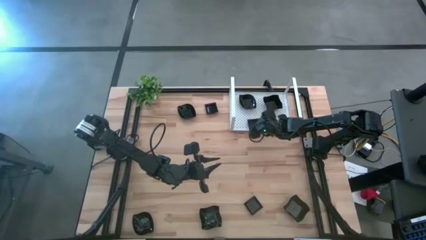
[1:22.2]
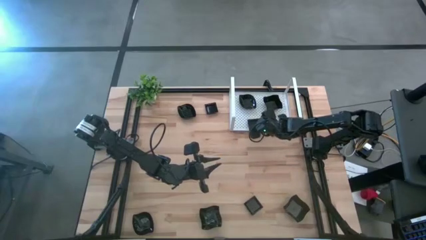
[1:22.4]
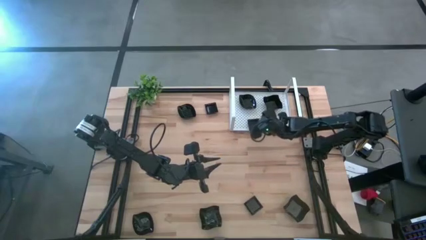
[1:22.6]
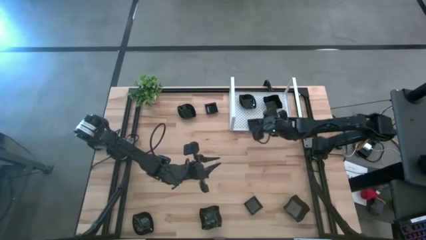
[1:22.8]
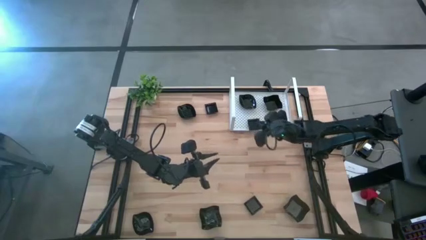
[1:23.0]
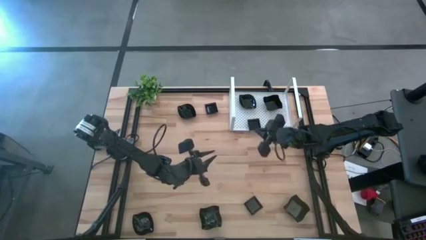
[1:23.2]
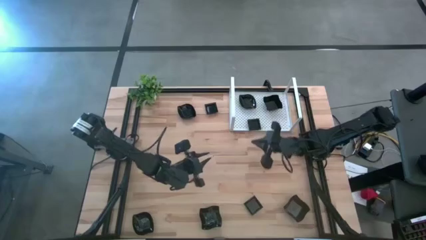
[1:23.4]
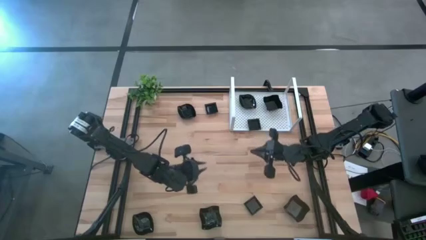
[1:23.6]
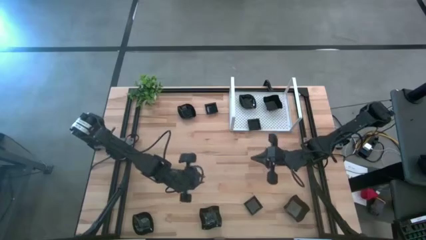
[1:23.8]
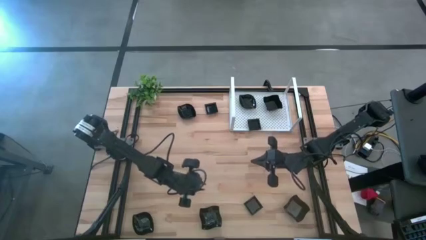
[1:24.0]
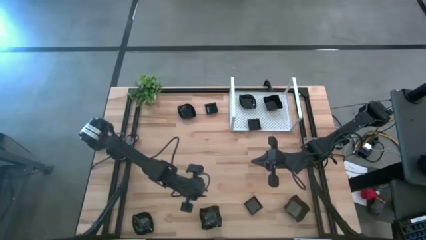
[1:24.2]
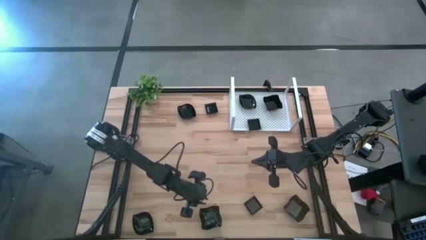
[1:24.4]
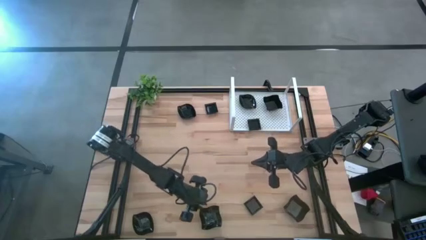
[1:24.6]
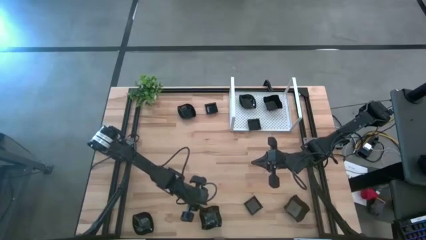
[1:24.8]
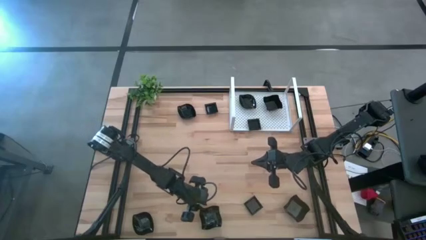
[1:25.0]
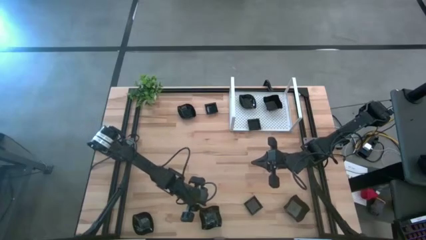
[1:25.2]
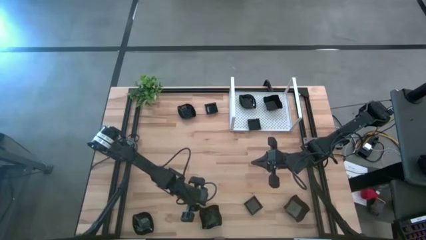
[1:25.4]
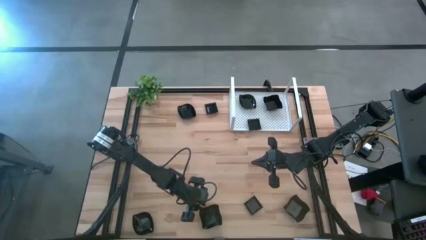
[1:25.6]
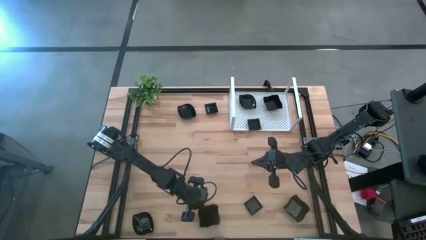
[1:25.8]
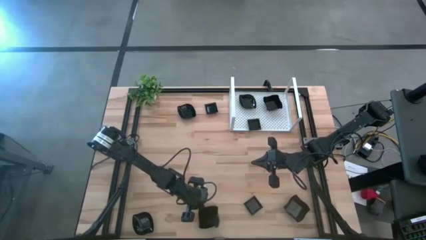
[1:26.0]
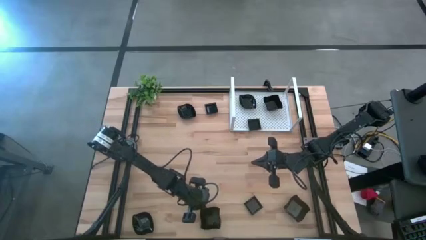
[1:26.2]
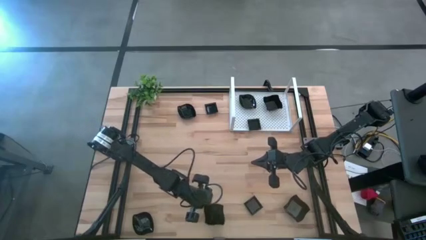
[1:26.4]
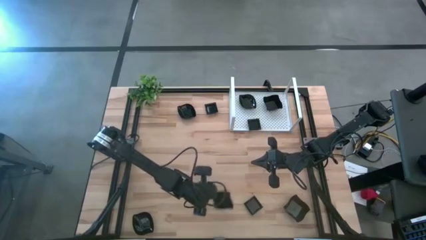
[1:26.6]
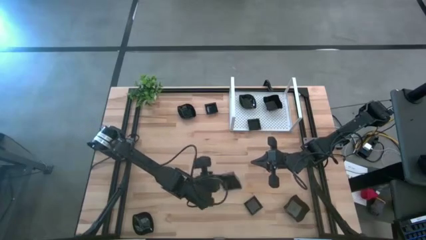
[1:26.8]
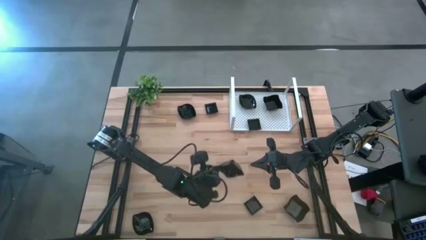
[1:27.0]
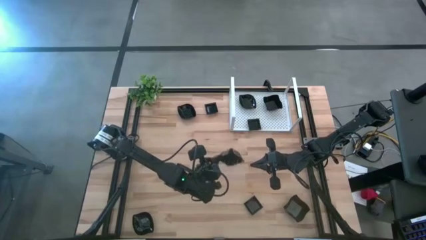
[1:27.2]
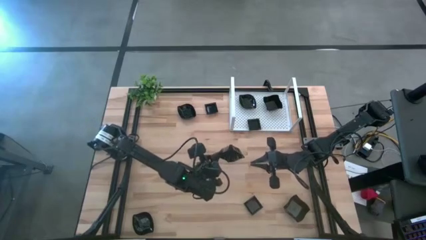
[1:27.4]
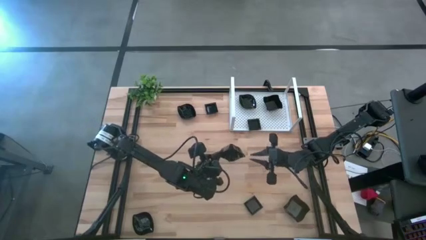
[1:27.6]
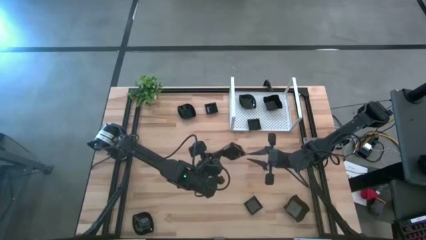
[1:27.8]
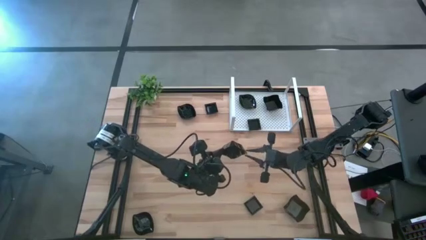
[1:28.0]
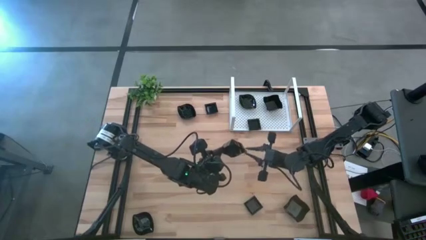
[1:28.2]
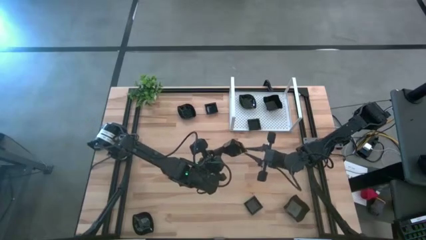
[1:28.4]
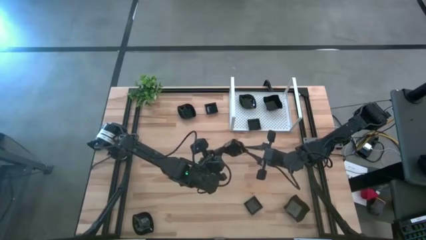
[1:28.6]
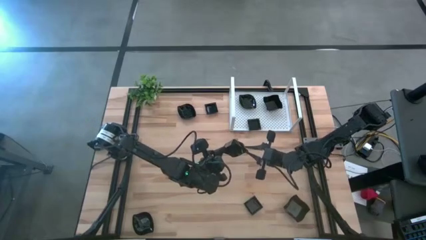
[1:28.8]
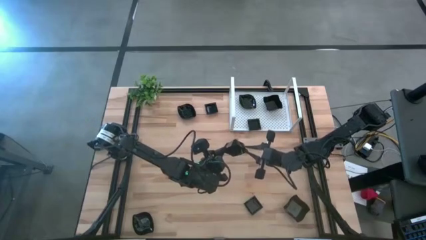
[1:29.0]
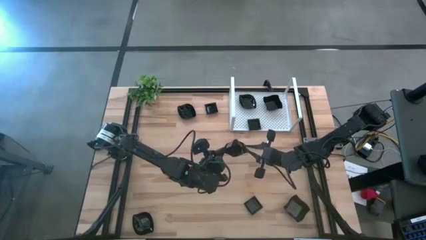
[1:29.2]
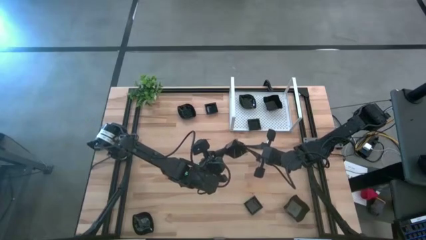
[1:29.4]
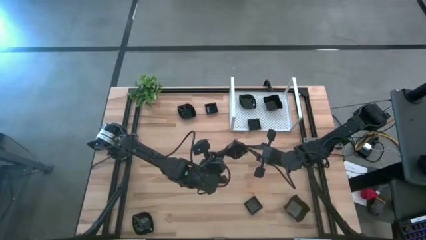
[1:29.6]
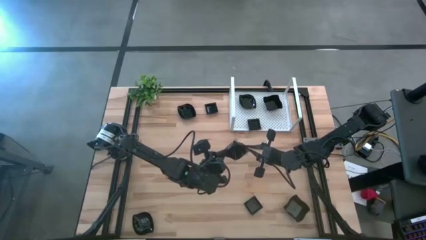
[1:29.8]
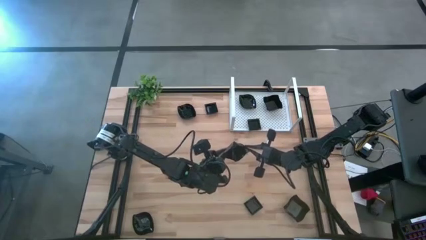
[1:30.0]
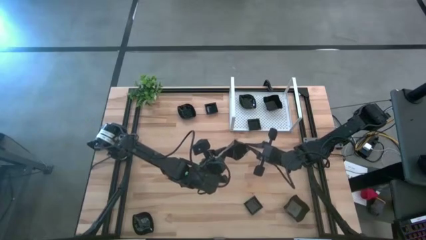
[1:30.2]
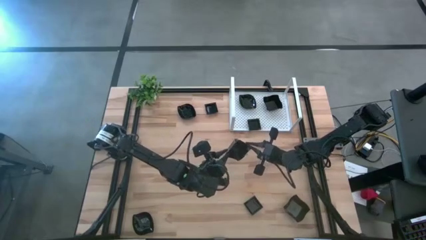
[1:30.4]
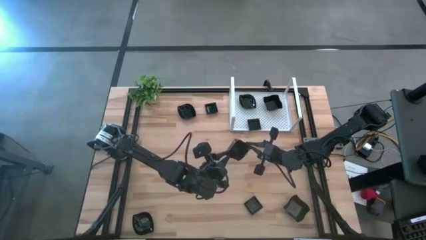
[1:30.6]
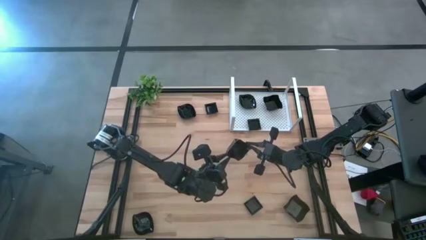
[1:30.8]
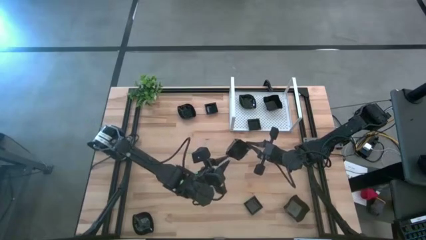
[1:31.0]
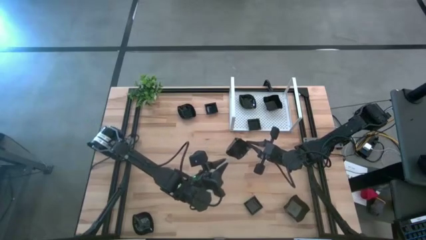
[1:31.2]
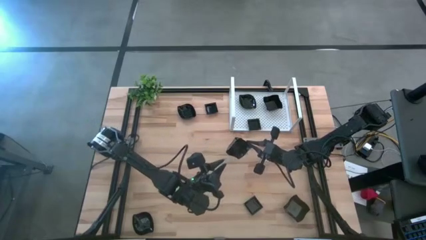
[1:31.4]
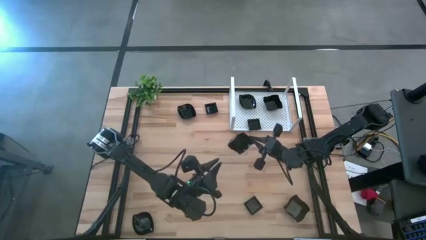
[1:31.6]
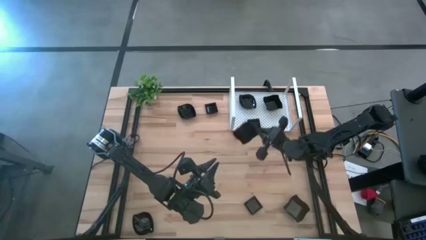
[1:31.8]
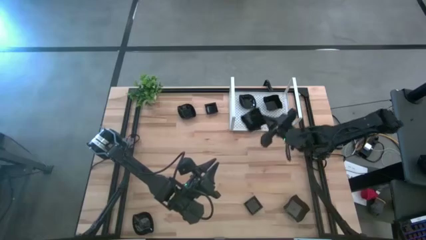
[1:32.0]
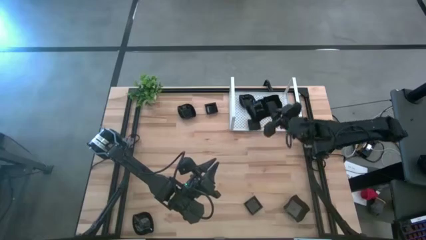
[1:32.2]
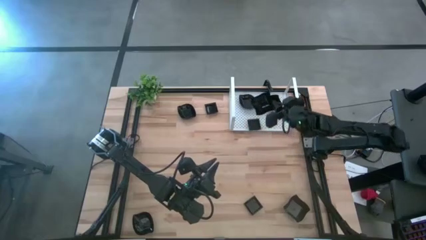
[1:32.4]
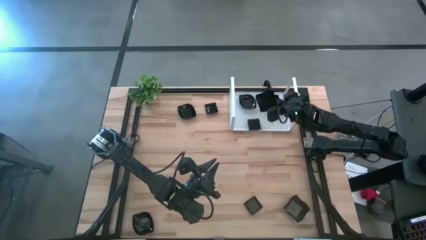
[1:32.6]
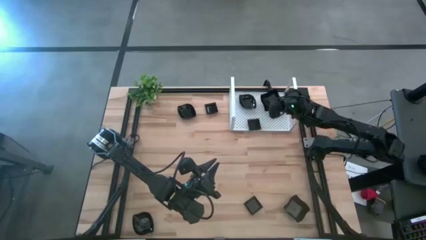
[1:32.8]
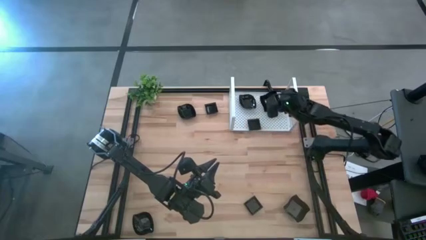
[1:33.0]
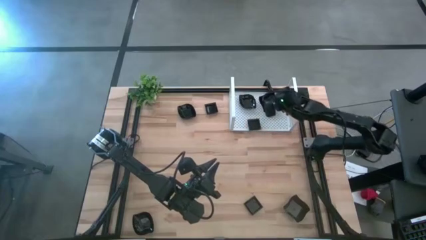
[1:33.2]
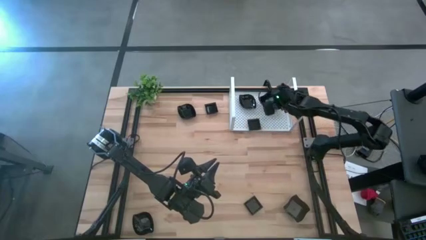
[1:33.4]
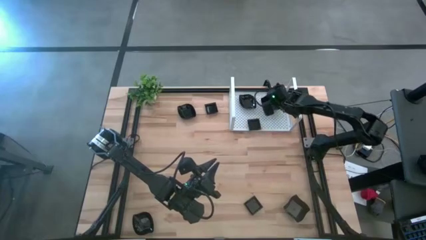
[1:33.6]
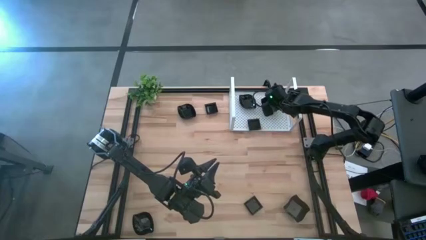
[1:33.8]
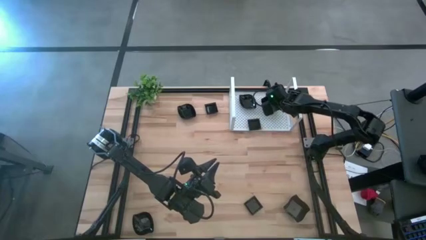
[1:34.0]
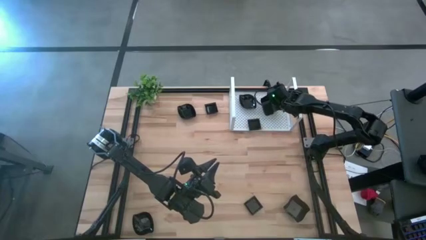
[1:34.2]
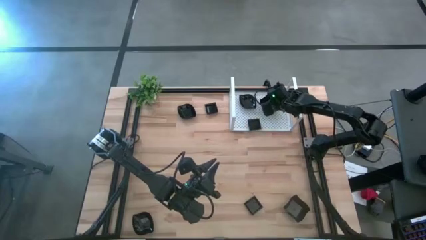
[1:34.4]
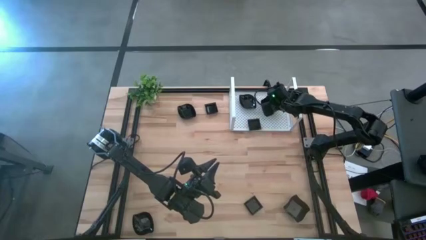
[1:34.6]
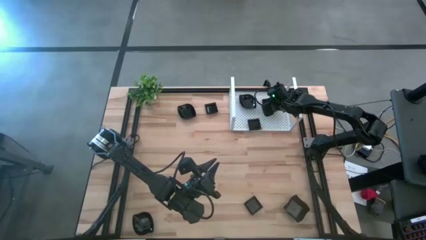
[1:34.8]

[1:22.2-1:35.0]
Task: Pick & Place Mini shaped plates
Stack the distorted square plate on top of the other distorted square plates on the shelf
